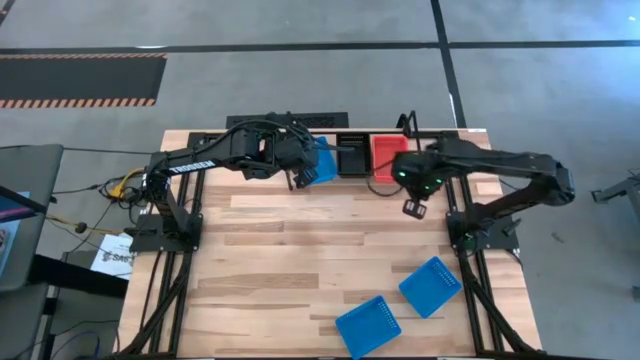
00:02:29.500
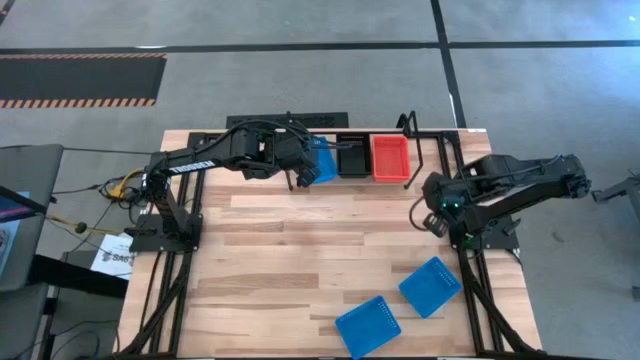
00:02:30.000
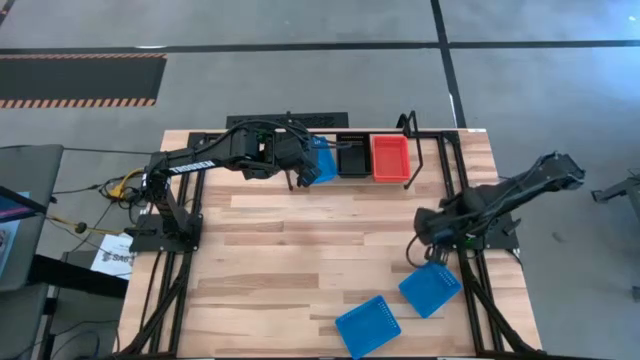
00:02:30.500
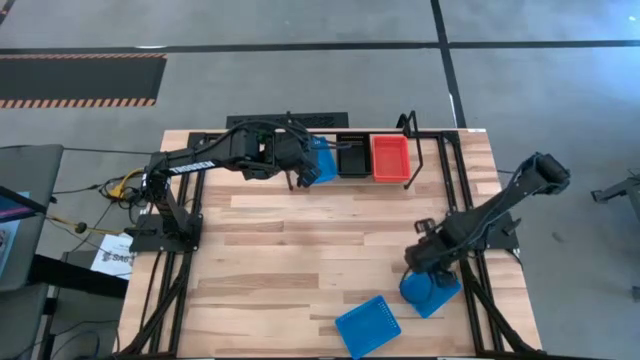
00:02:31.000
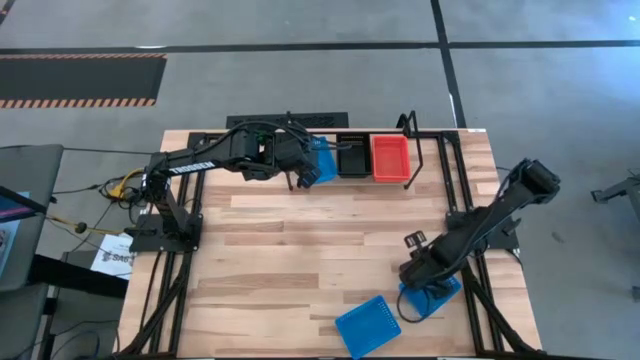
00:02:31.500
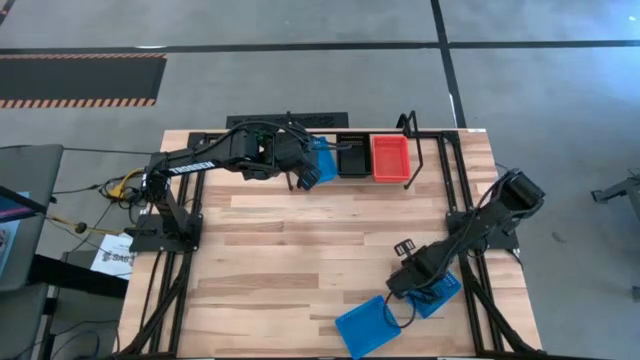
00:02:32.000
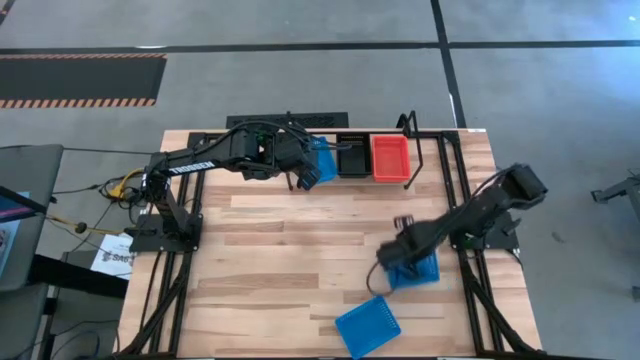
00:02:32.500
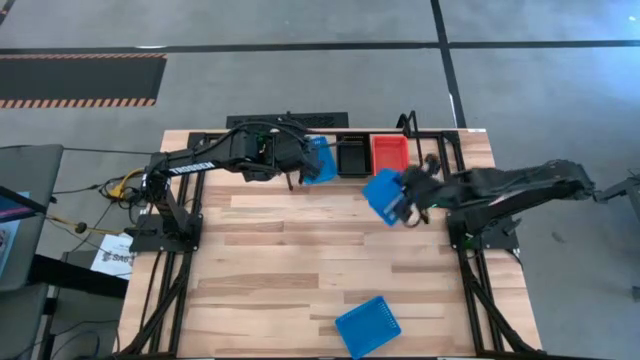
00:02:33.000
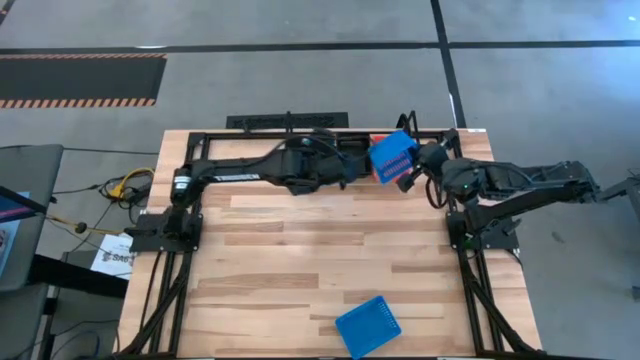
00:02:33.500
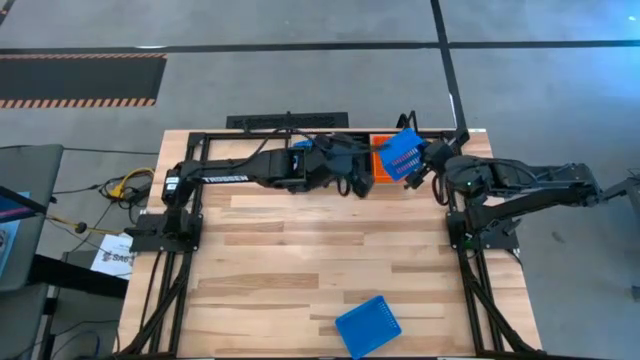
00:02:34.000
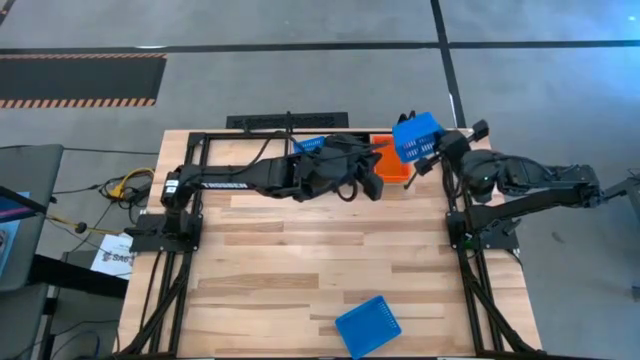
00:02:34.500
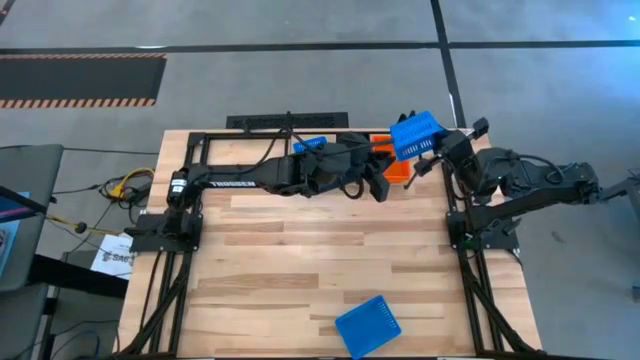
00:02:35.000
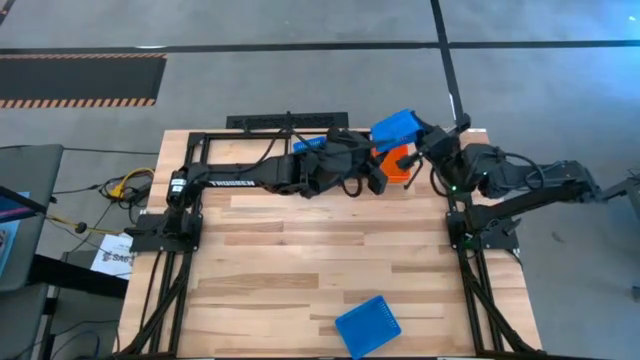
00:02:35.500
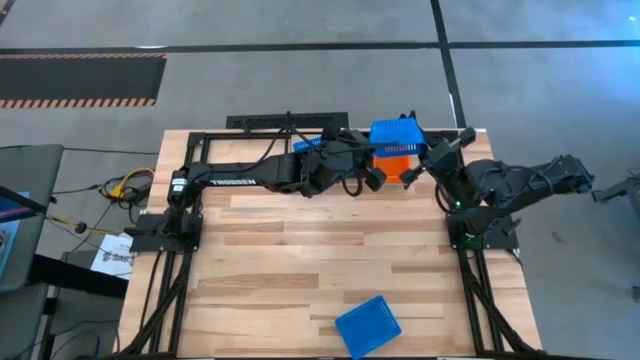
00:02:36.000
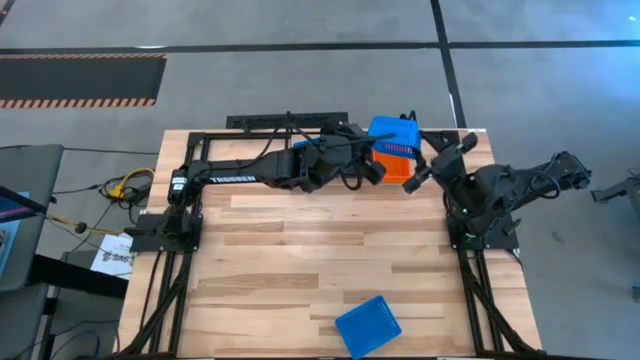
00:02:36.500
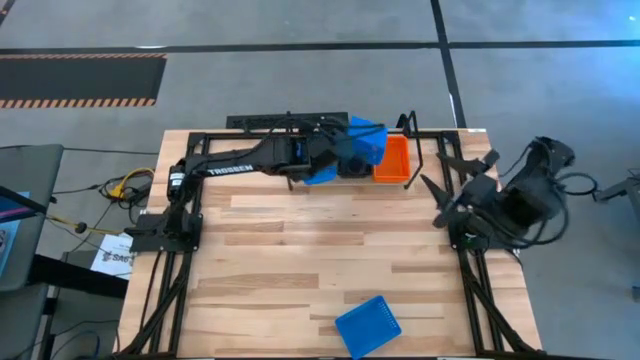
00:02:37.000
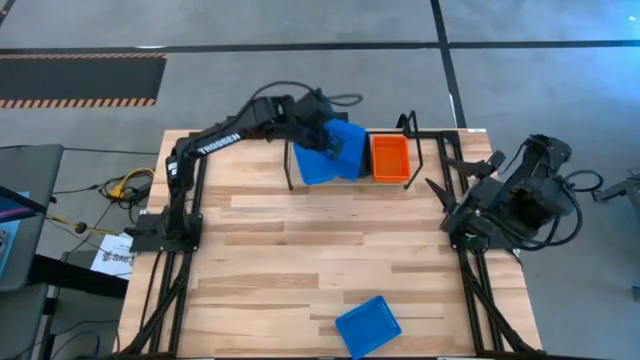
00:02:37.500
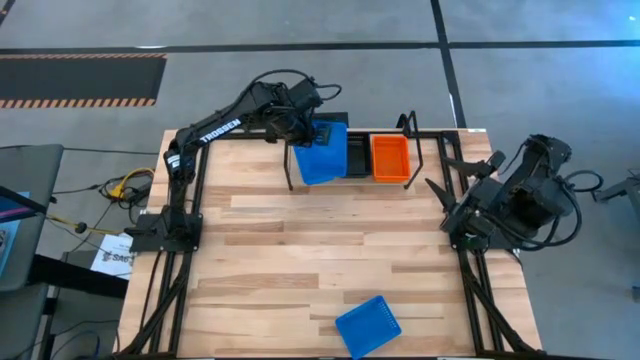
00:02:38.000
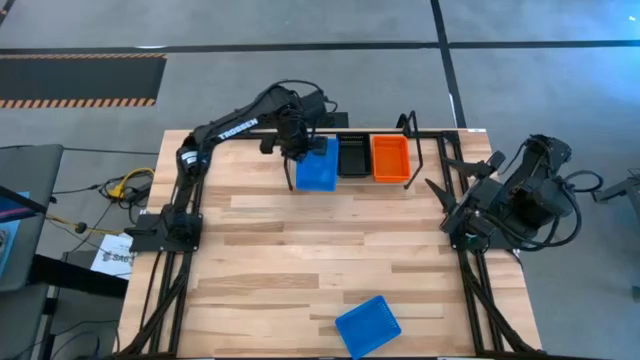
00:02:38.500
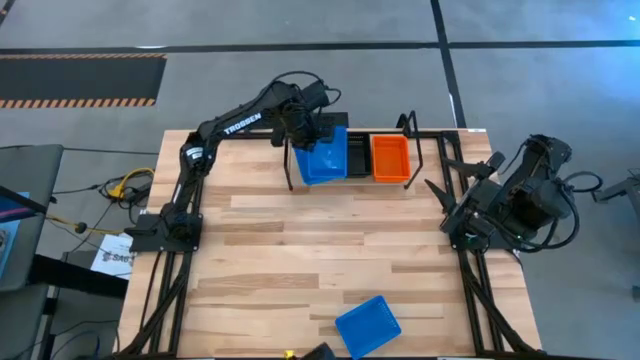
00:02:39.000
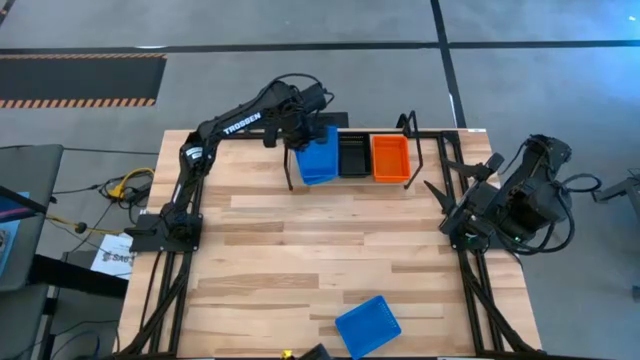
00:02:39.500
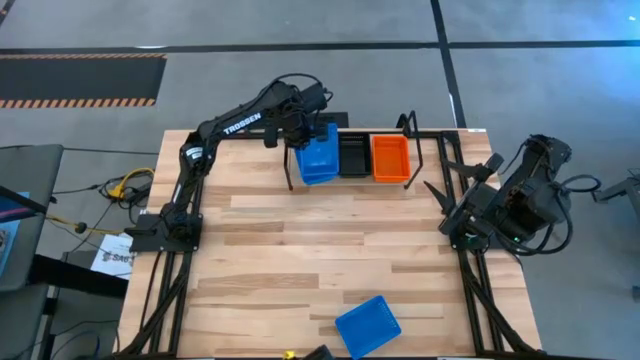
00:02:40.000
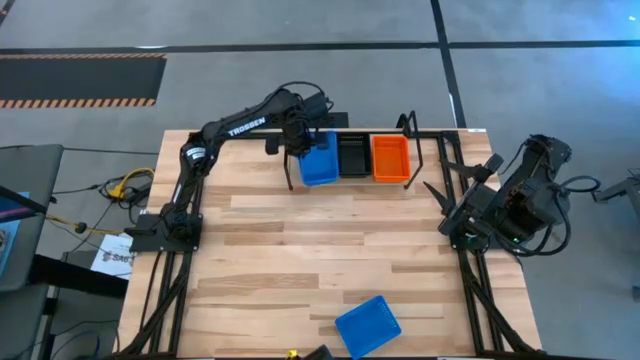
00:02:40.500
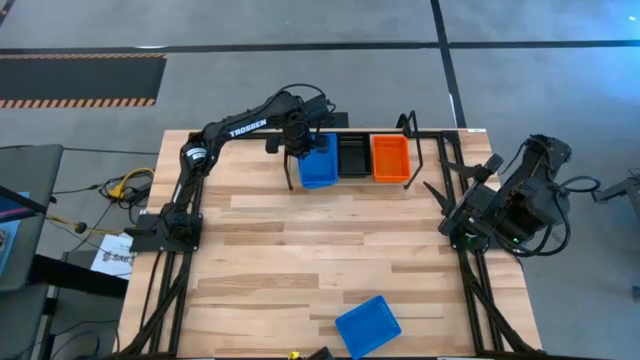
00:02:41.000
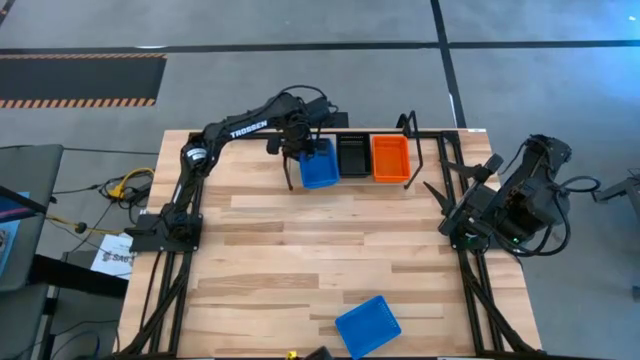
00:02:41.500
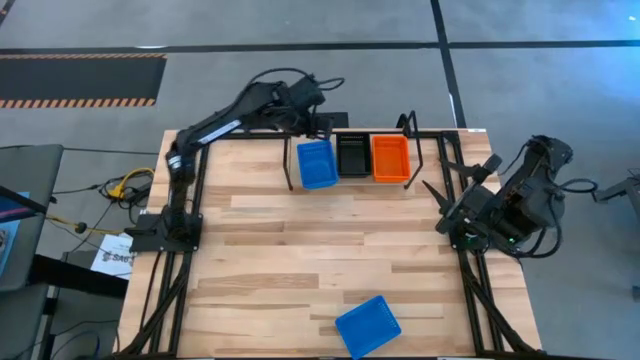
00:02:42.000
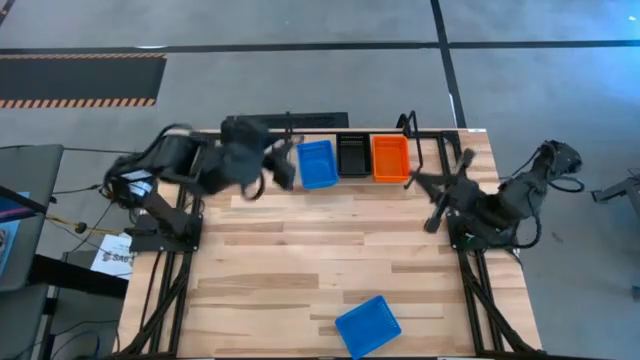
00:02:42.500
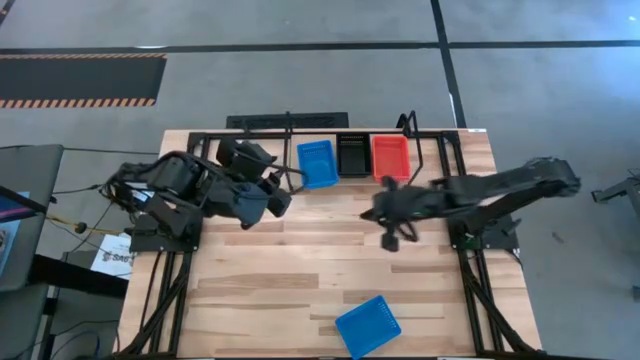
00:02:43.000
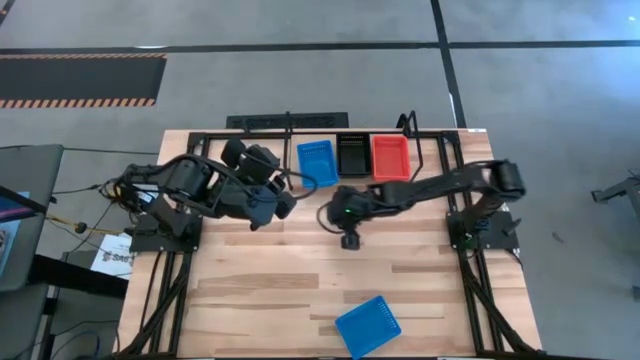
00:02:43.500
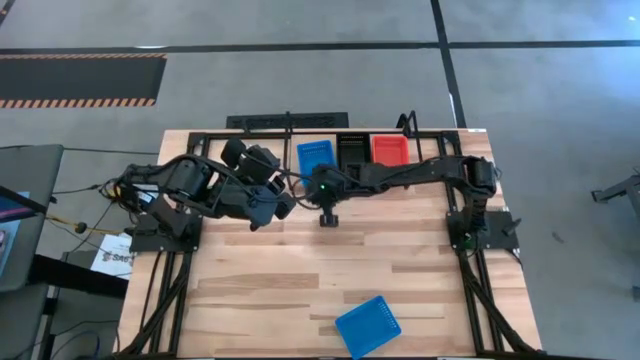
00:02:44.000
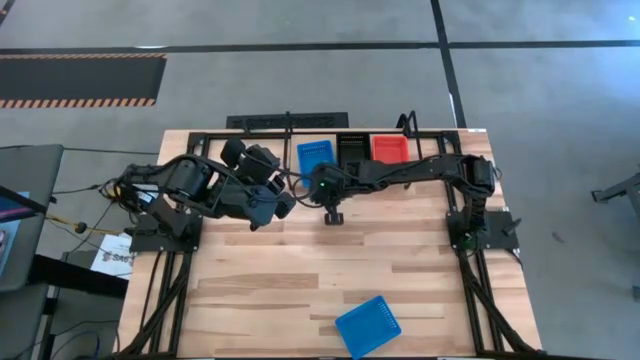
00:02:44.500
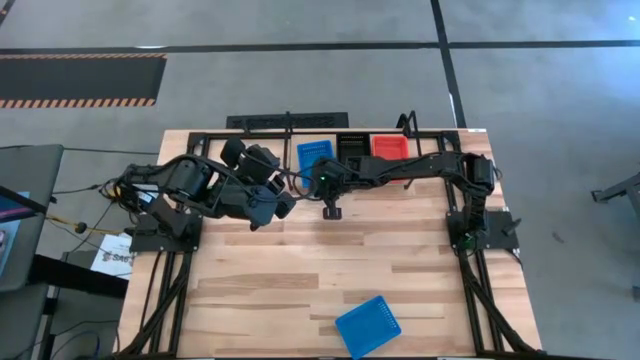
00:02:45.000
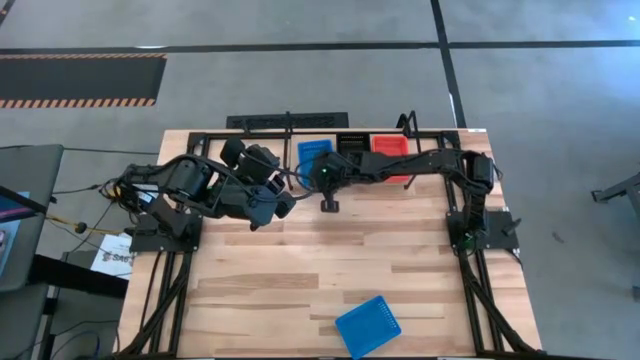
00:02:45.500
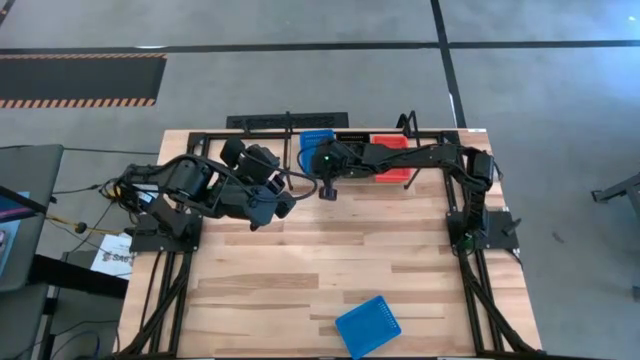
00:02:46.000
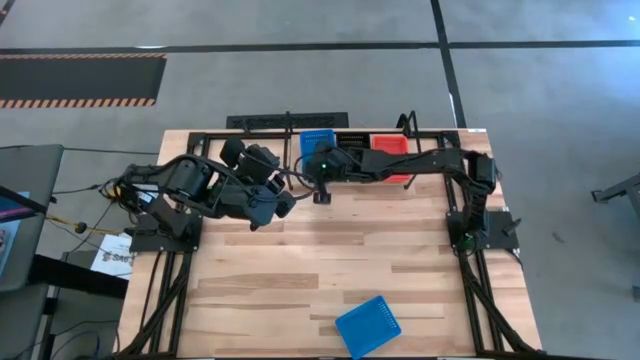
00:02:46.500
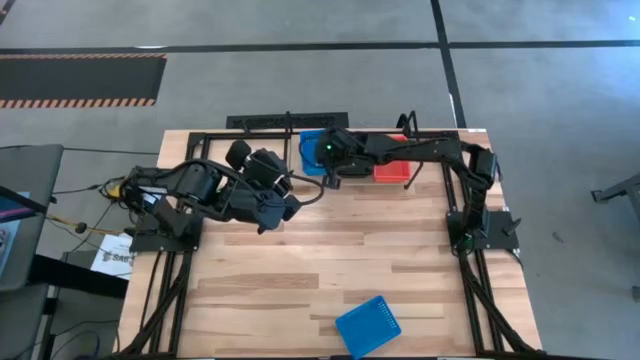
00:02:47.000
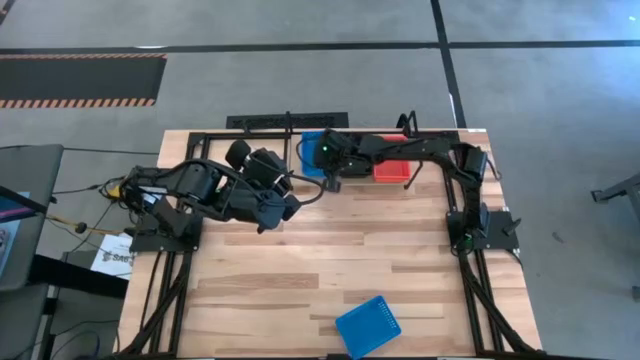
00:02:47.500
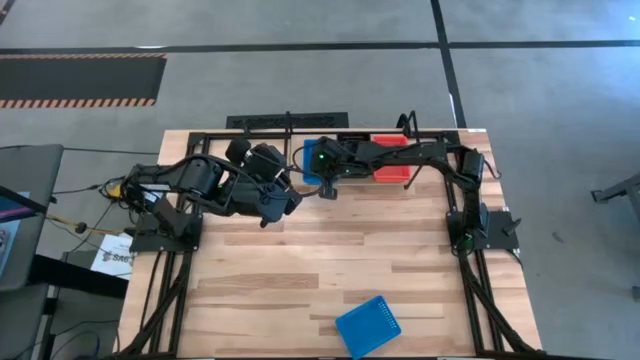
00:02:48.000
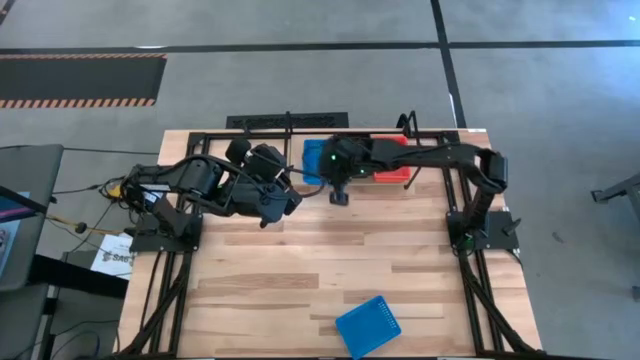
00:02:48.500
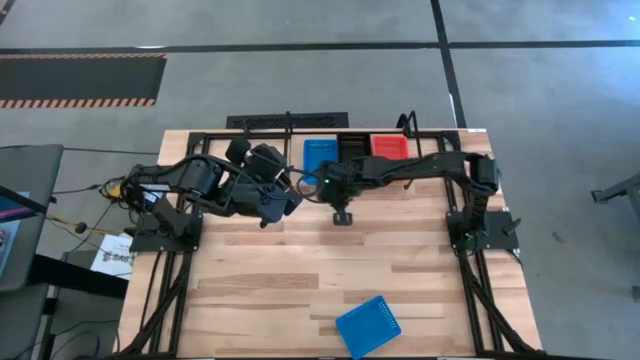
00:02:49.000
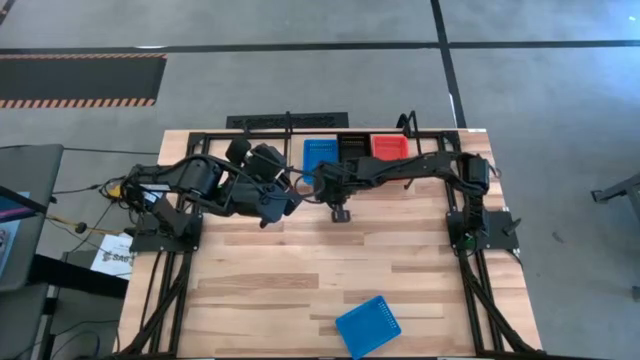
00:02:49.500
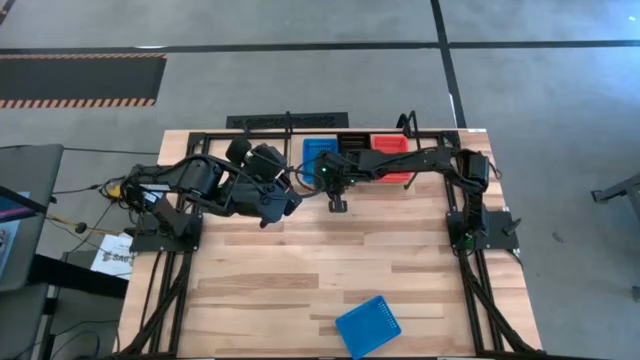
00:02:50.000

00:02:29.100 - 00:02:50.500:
Task: Stack baskets on shelf by color
Stack the top blue bin on top of the blue bin on the shelf

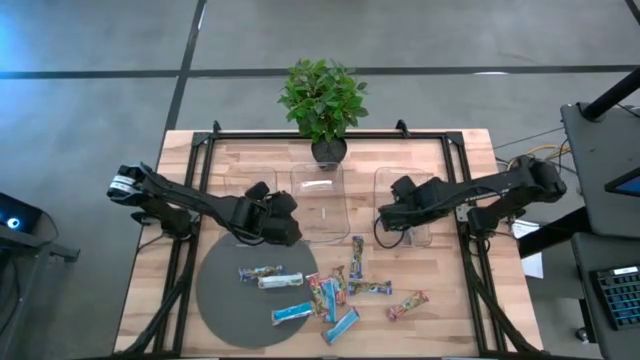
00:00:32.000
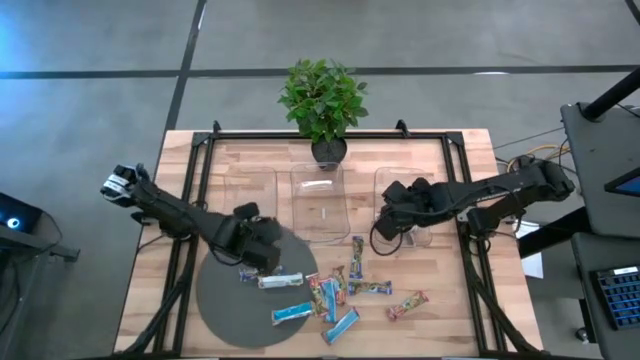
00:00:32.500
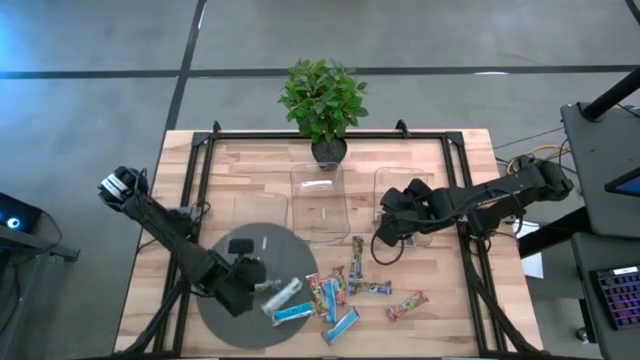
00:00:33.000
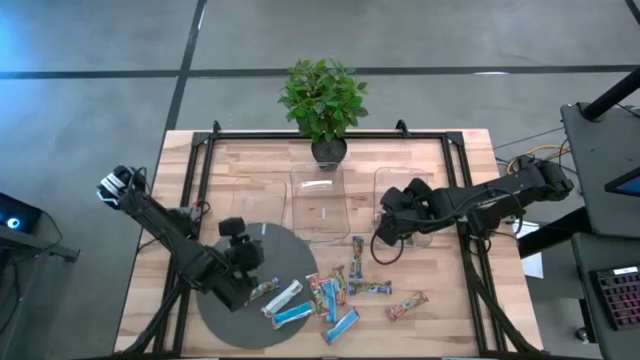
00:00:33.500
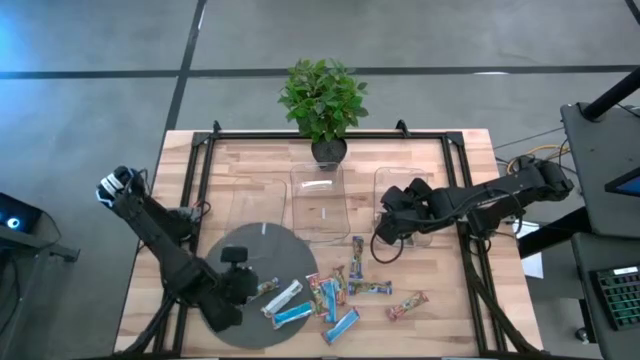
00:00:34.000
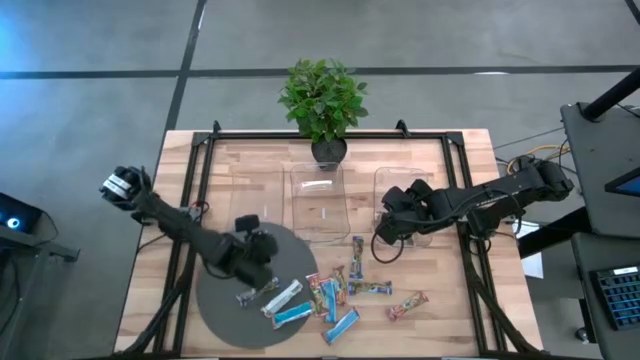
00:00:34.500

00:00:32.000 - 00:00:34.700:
Task: Pick and place Granola Bars by type
Adjust the left transparent bin on the table
